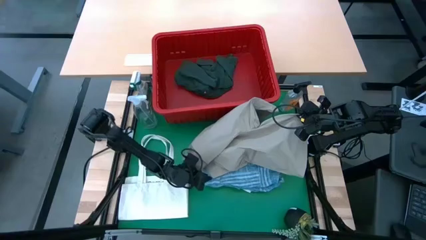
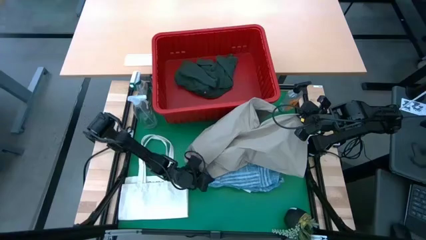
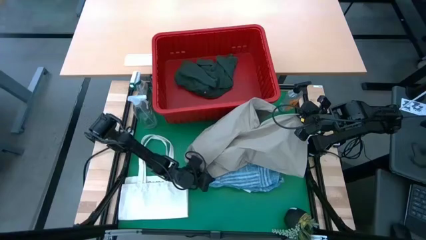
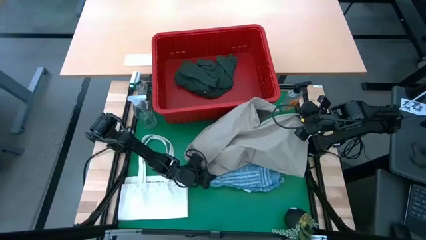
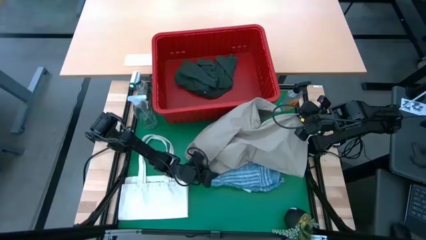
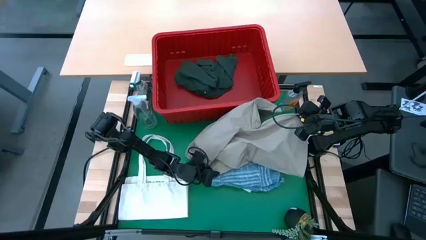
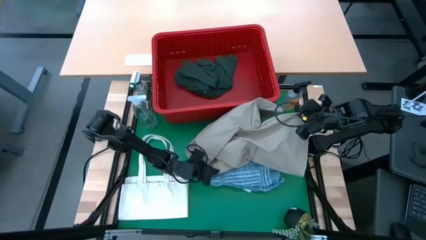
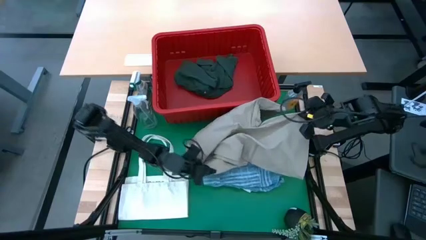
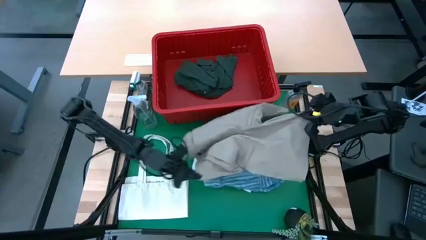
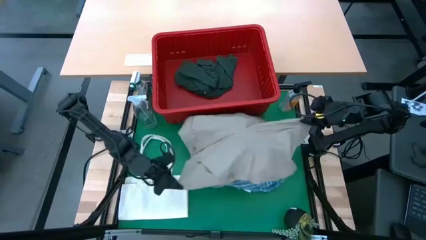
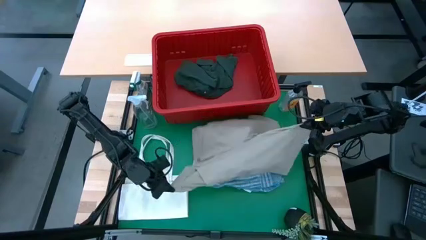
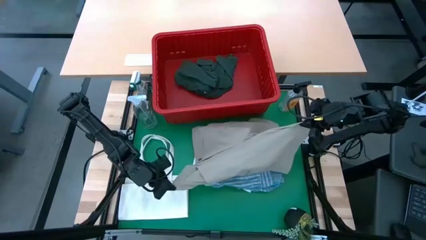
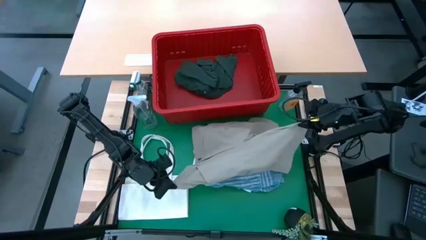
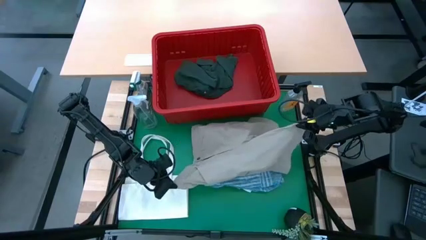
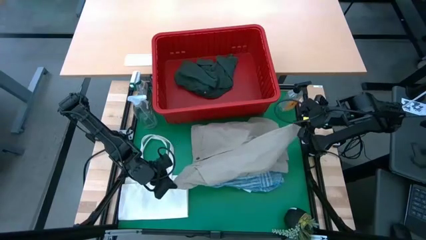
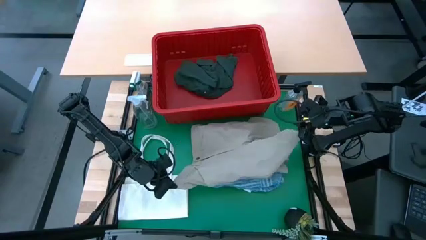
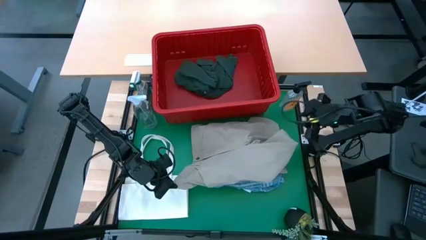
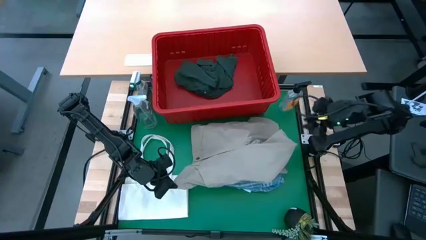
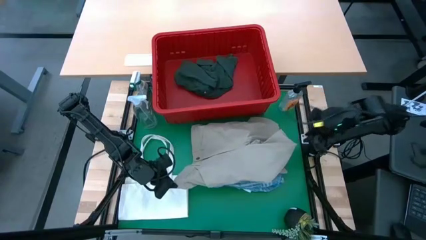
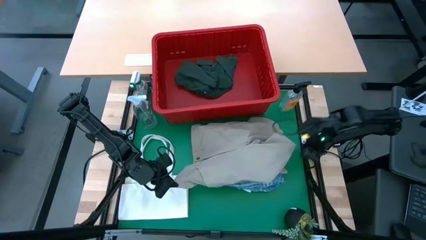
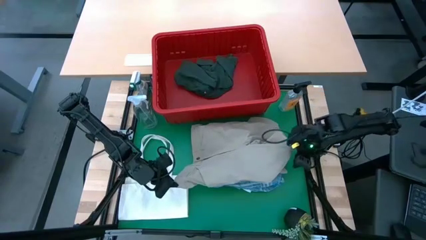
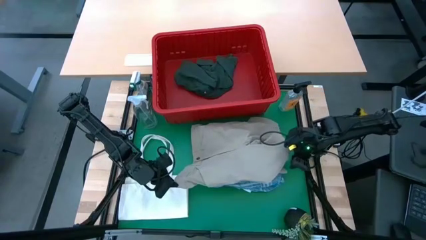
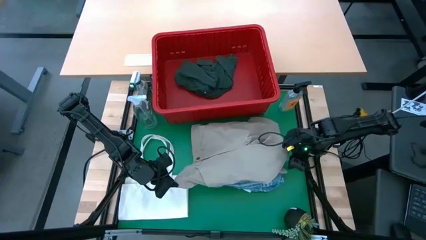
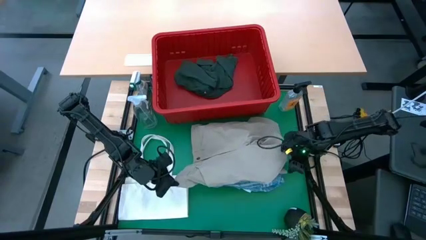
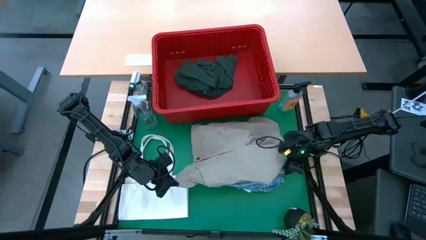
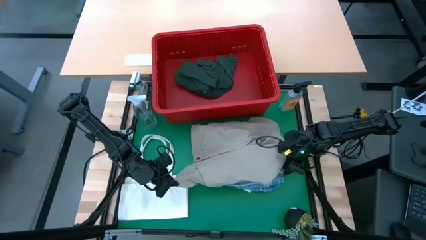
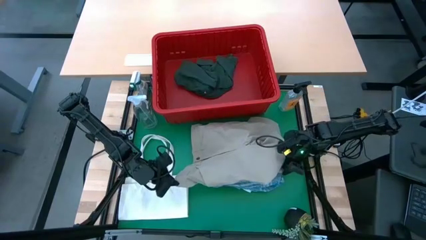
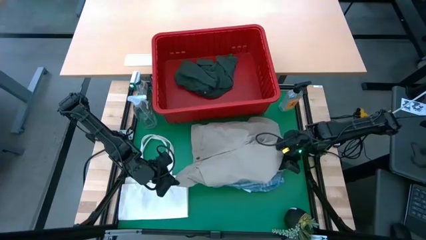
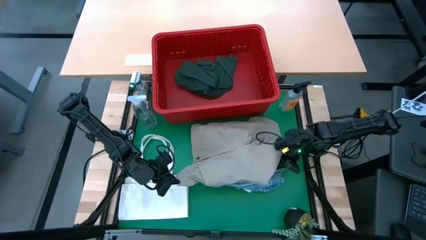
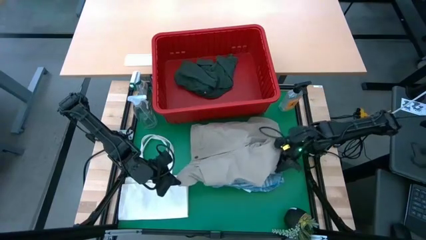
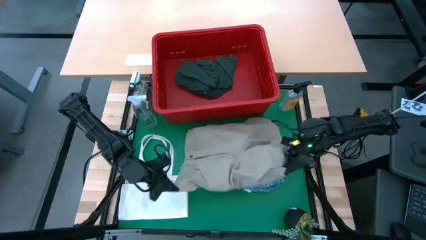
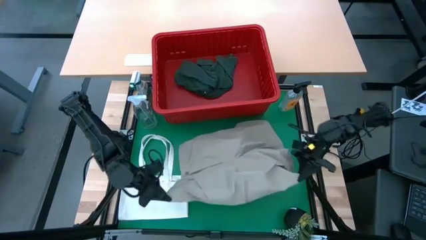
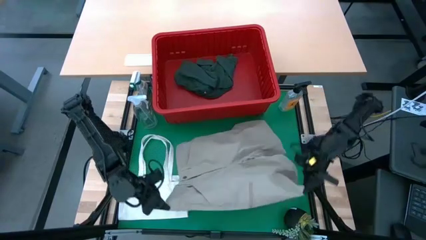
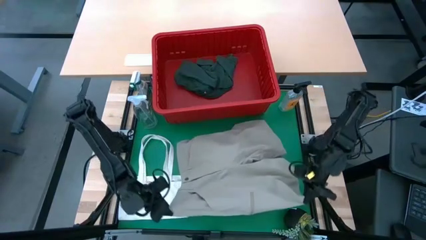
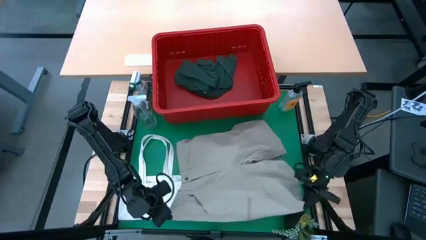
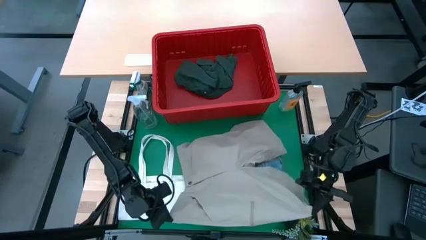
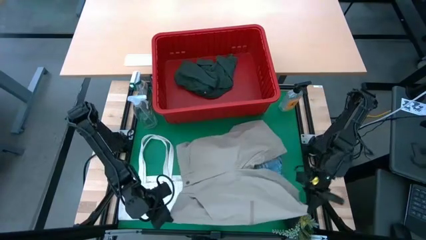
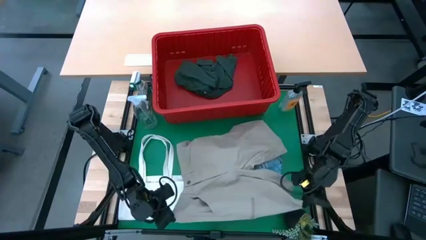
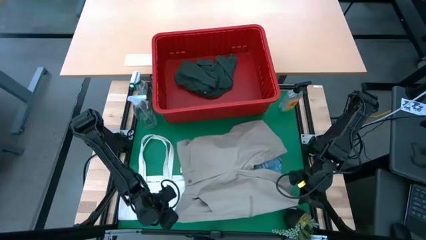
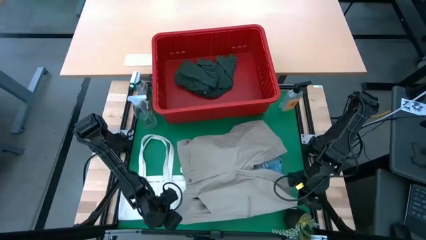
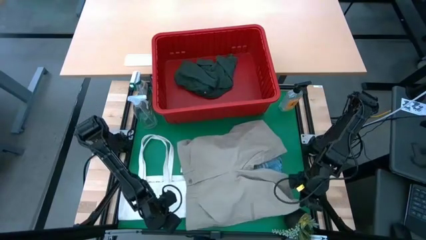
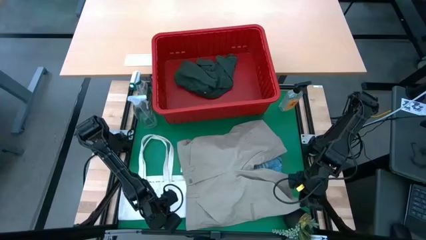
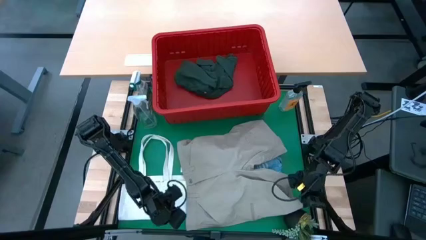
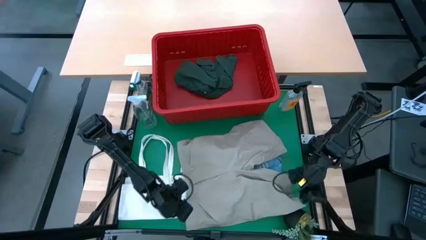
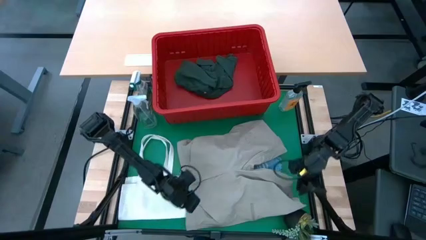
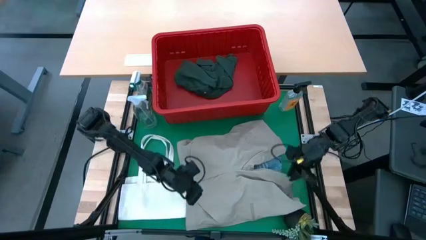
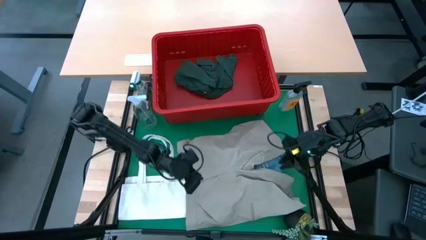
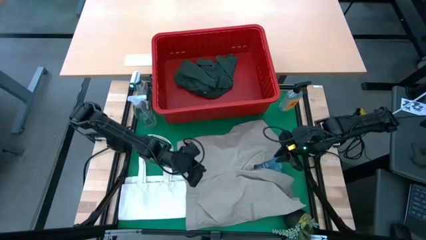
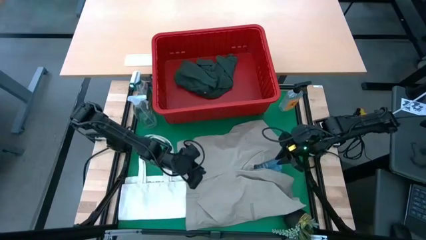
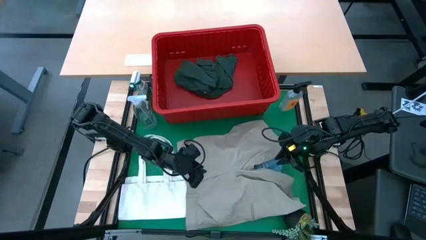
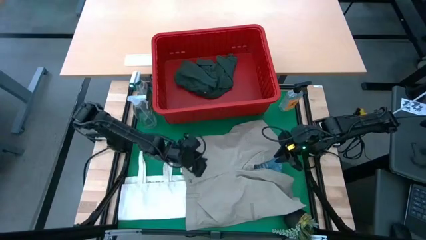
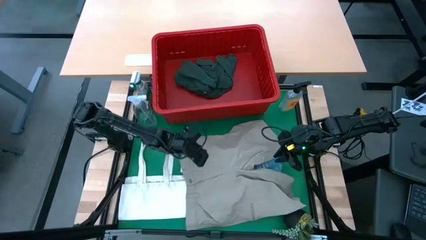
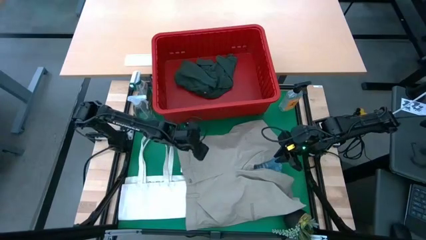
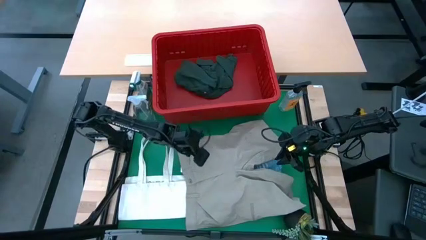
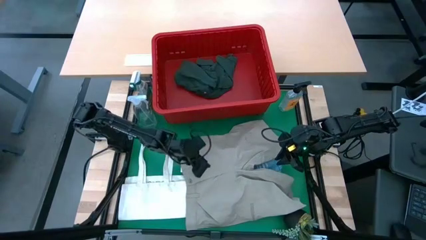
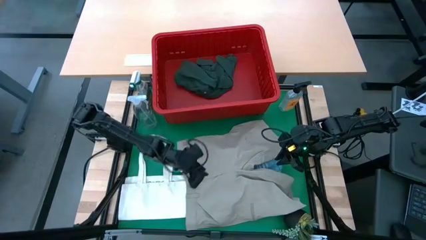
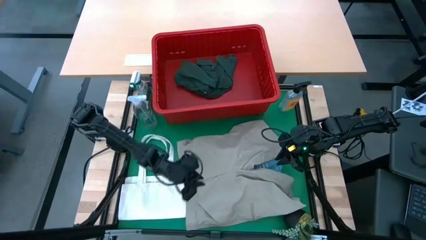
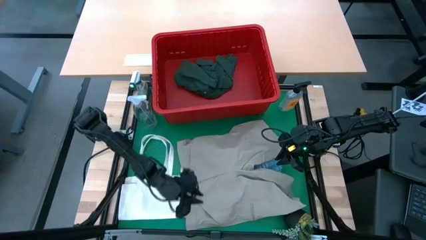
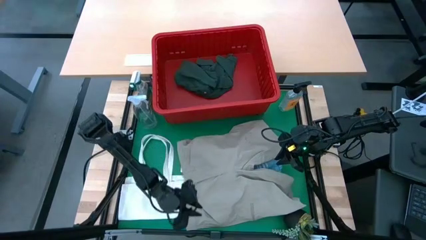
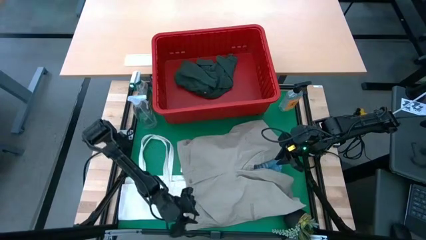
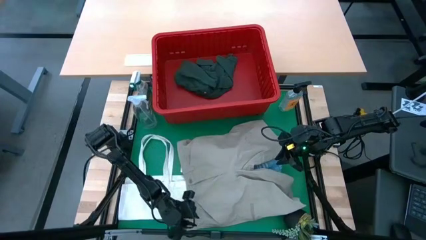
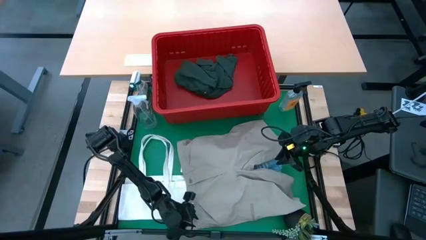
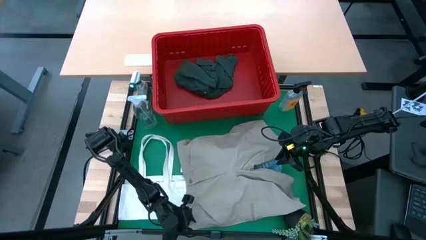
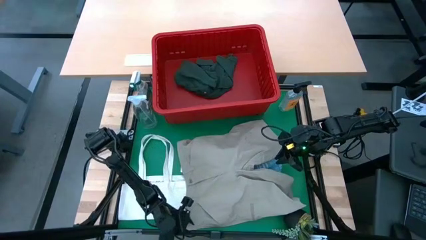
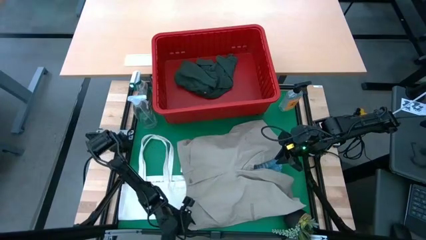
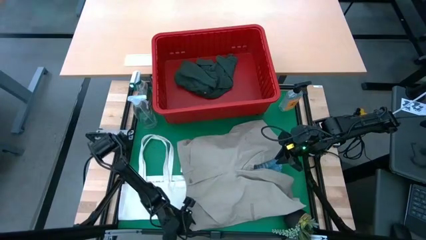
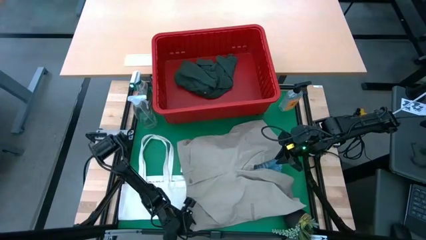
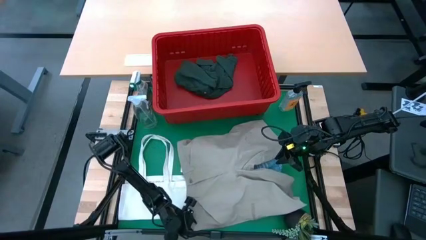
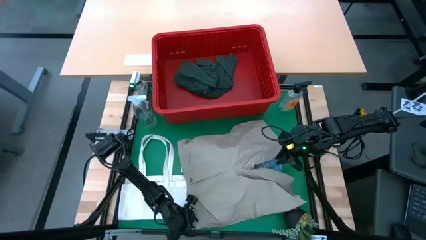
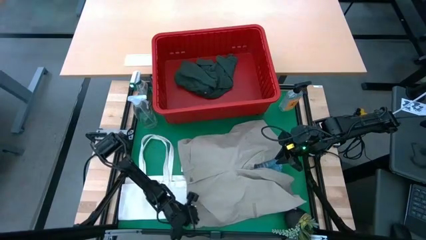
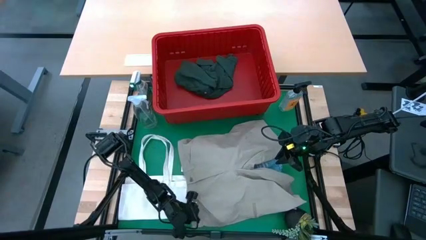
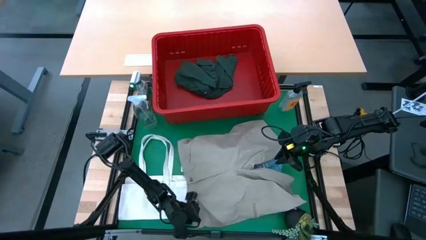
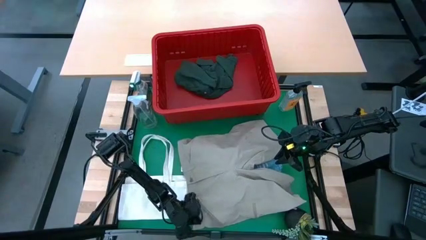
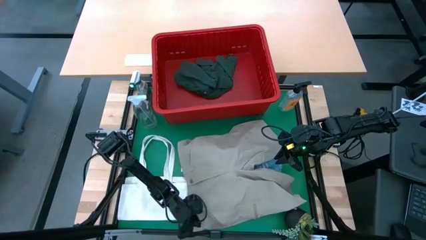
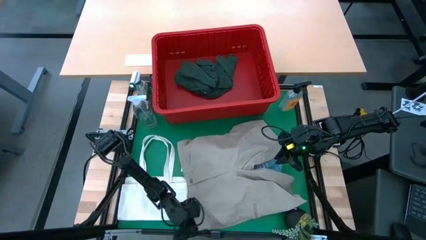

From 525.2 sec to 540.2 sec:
Task: Fold Laundry from Bin
Fold the light brown shorts
